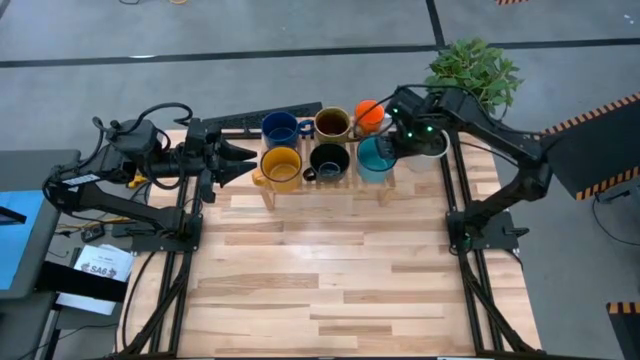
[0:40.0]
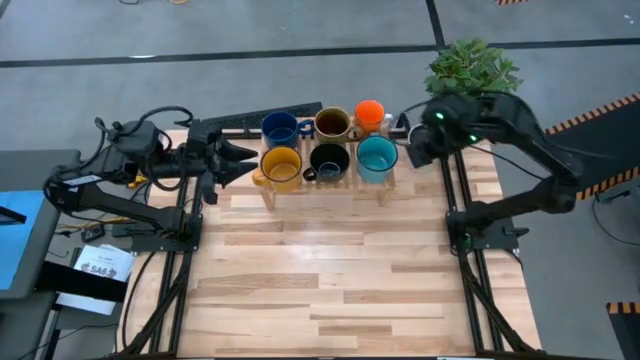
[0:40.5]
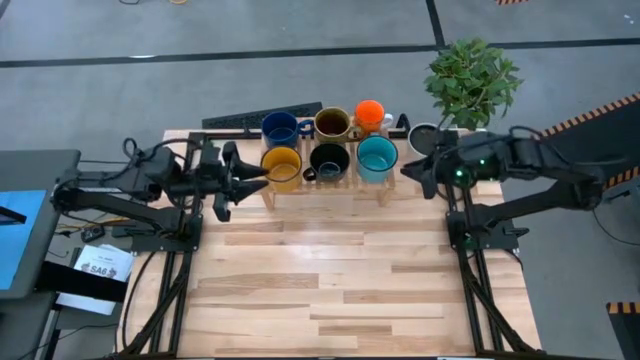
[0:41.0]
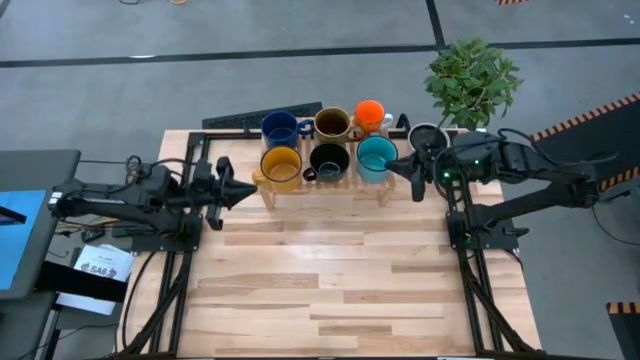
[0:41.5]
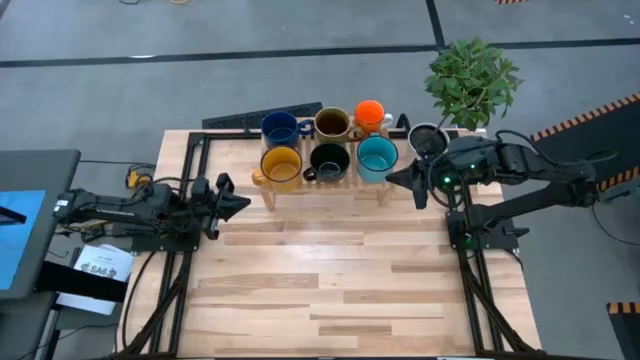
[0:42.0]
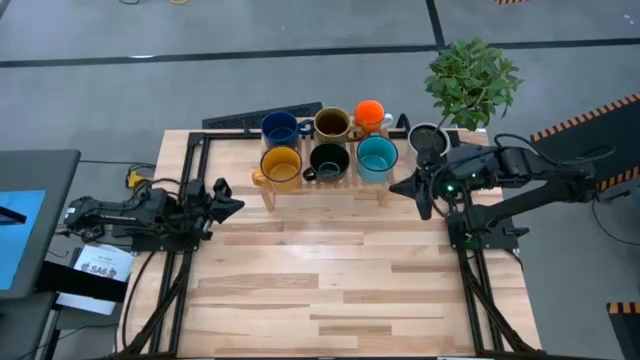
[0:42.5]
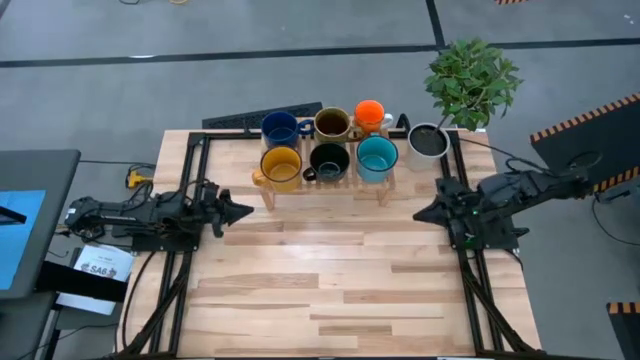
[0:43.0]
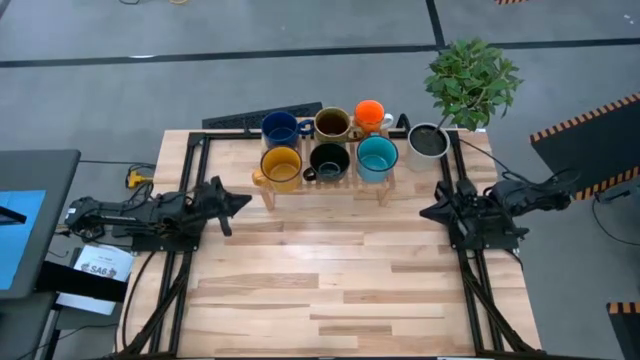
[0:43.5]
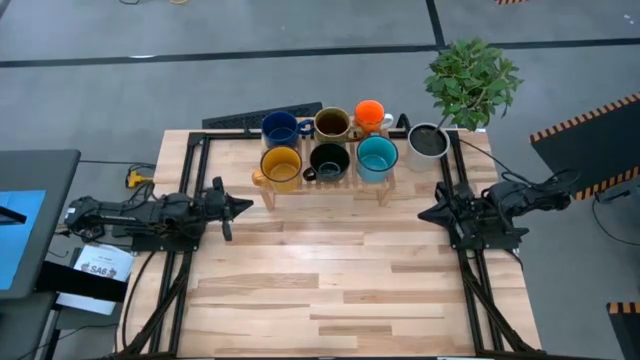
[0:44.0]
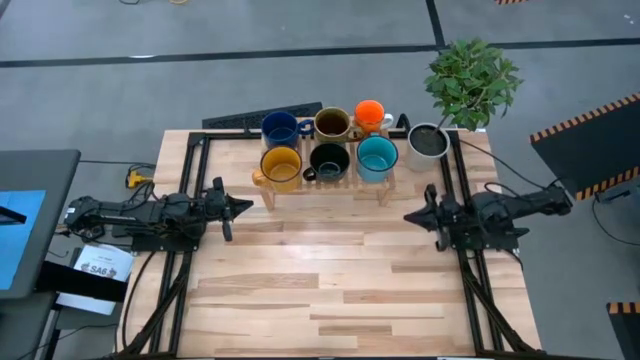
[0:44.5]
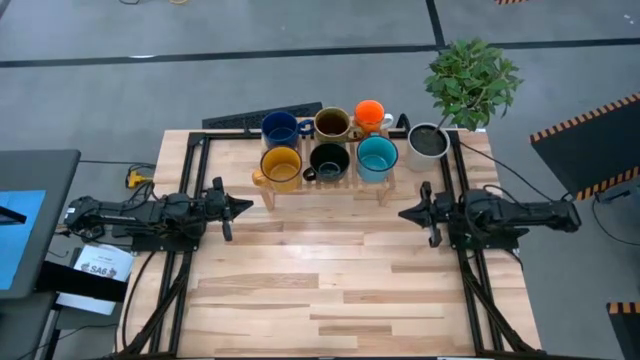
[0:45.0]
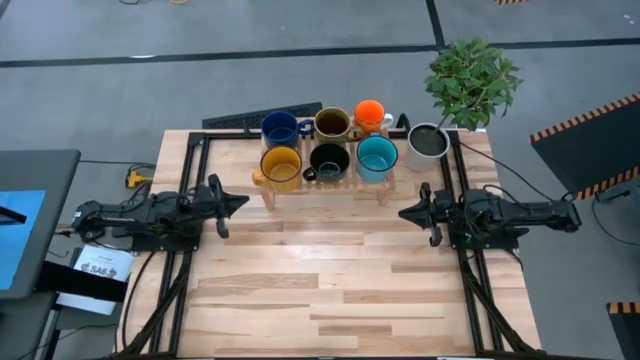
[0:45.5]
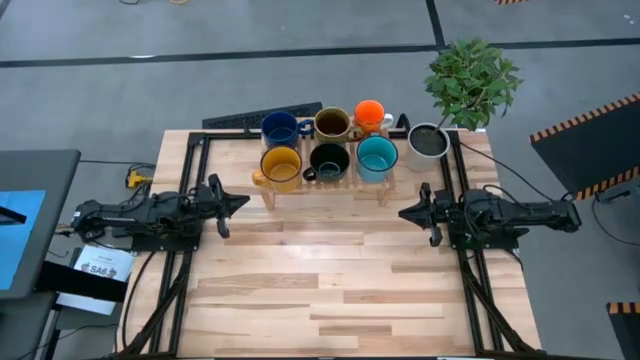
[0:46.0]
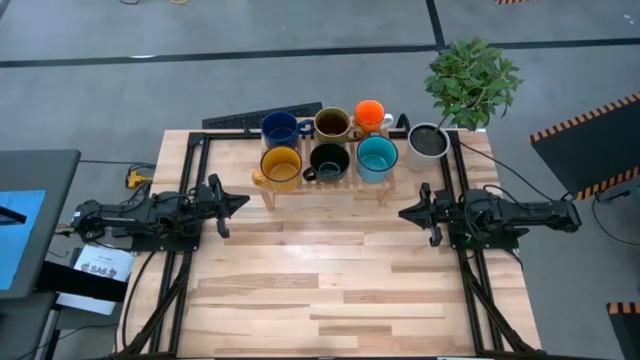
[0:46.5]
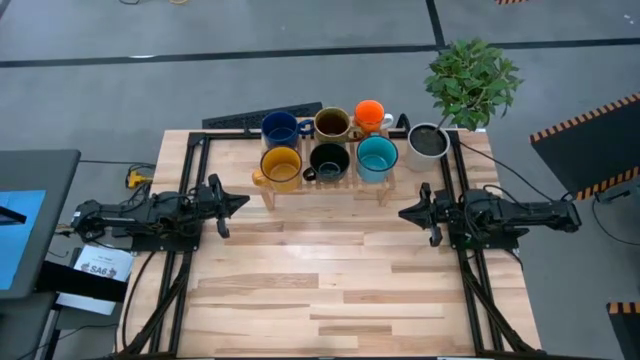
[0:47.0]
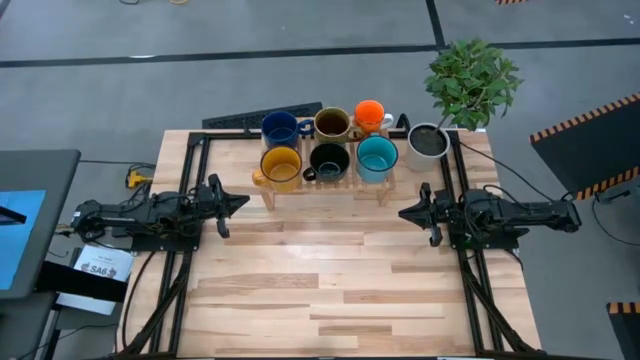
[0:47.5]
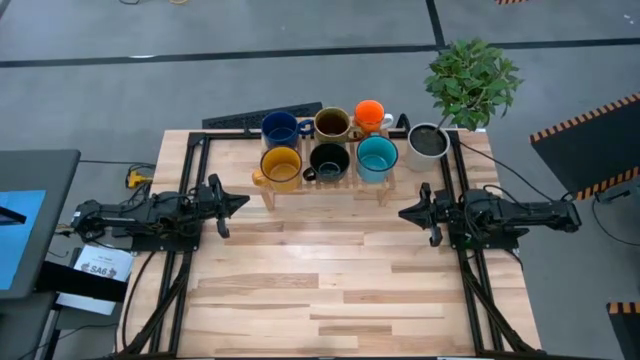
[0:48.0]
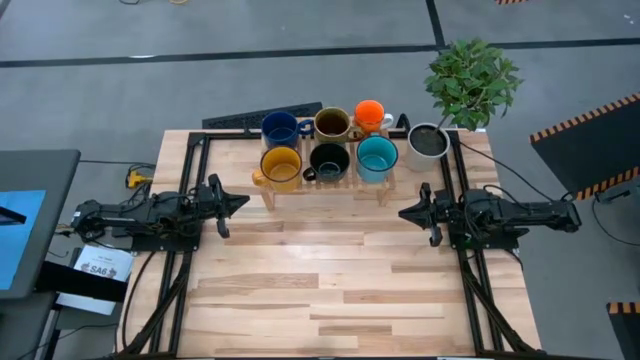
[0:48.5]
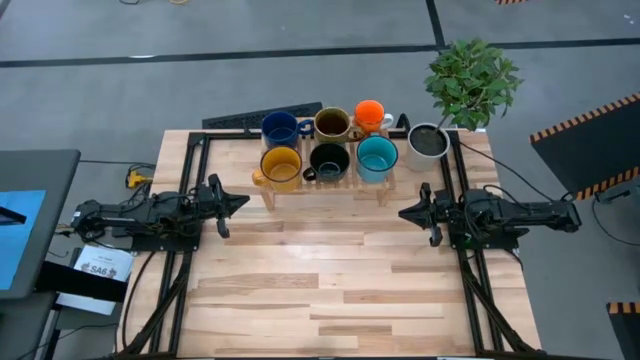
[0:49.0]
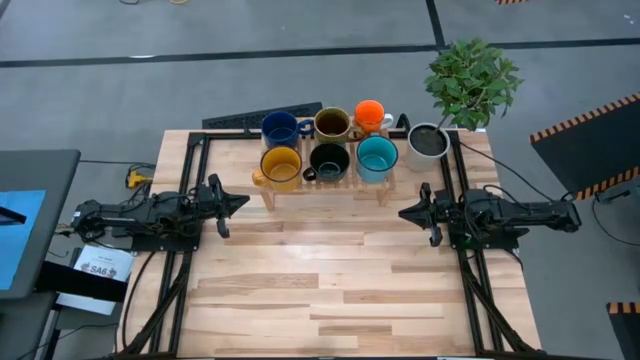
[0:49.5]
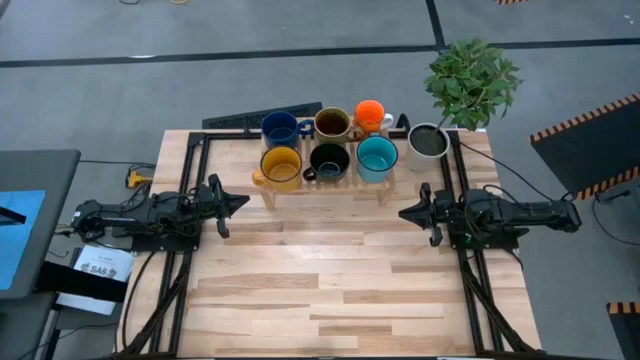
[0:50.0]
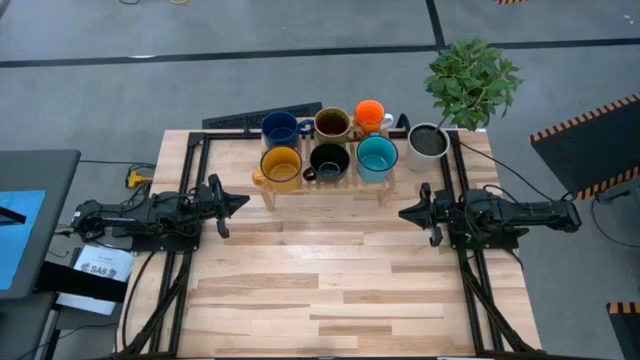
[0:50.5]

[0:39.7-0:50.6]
Task: Place coffee mugs
Return to Home Position

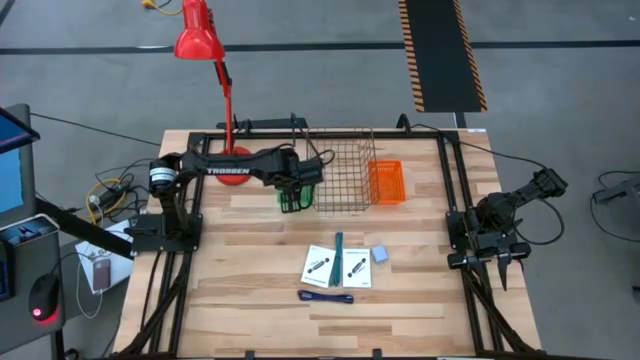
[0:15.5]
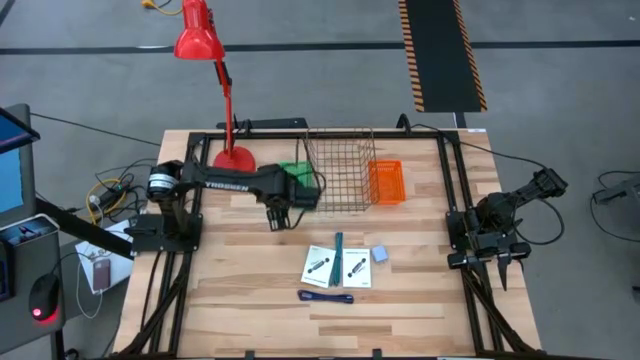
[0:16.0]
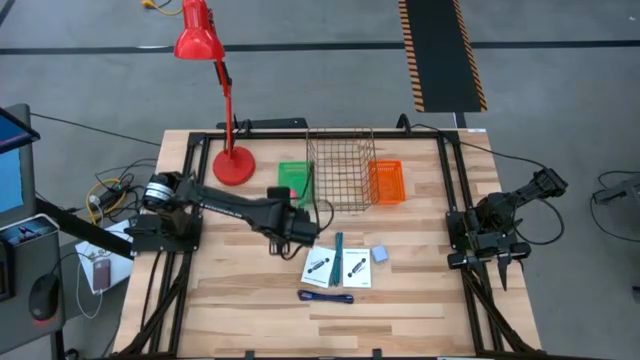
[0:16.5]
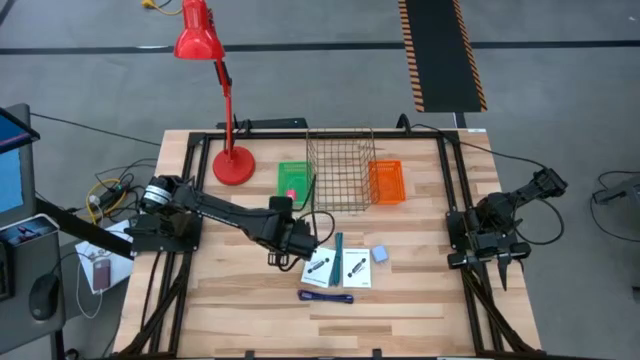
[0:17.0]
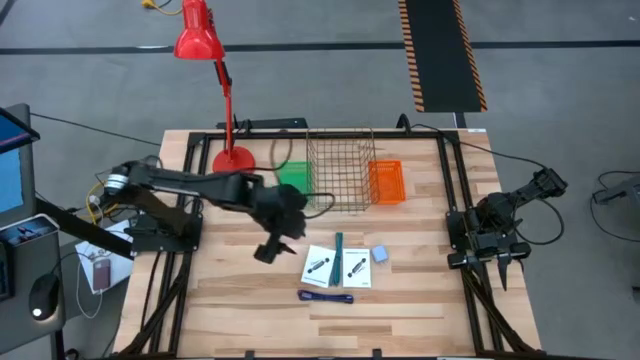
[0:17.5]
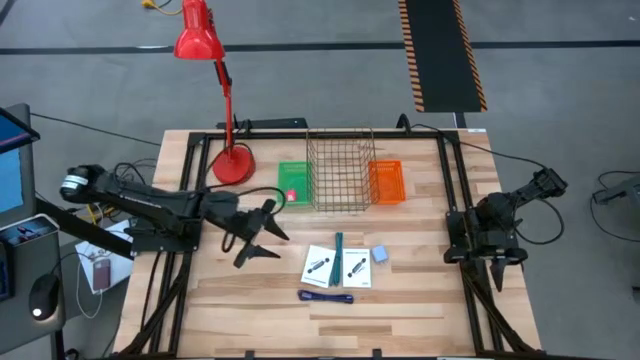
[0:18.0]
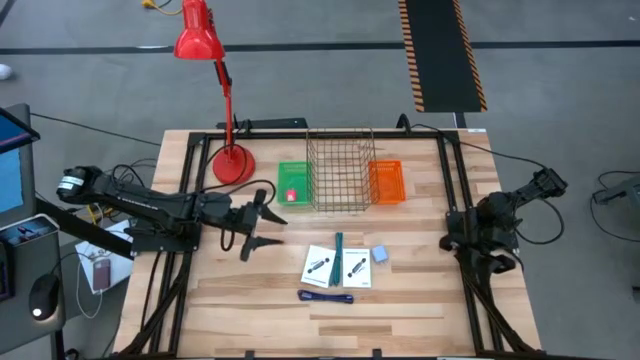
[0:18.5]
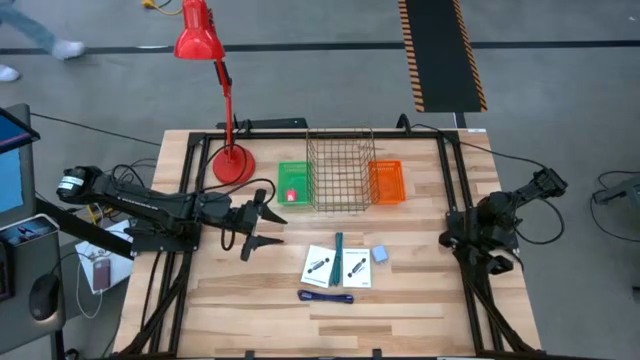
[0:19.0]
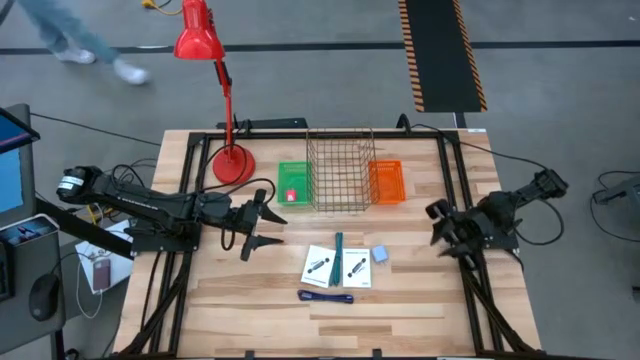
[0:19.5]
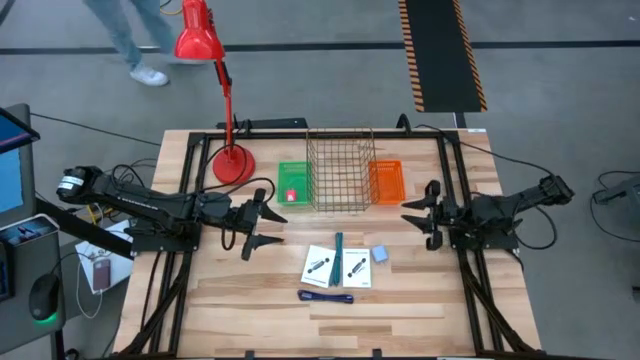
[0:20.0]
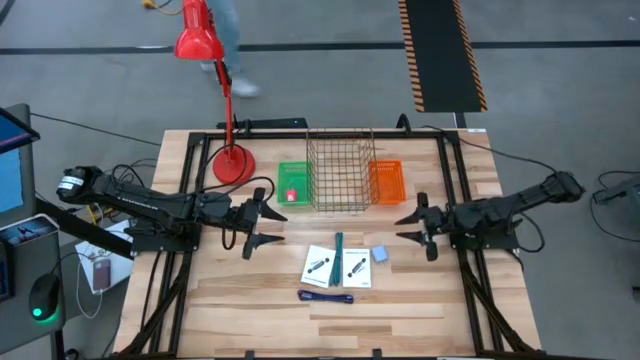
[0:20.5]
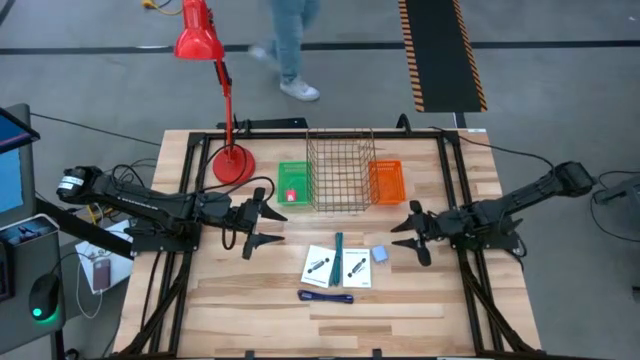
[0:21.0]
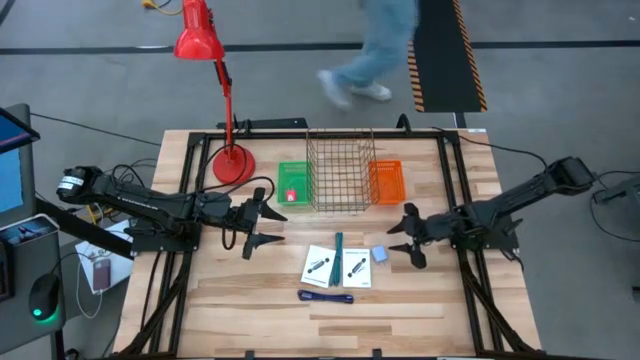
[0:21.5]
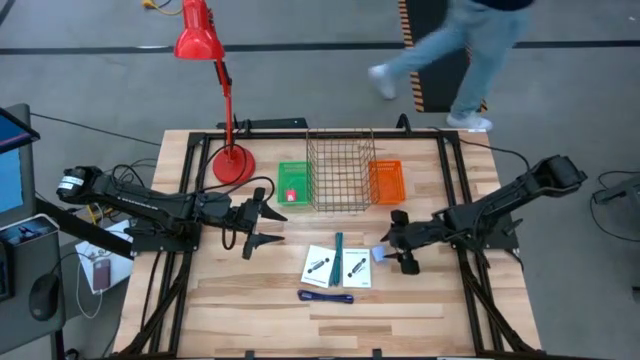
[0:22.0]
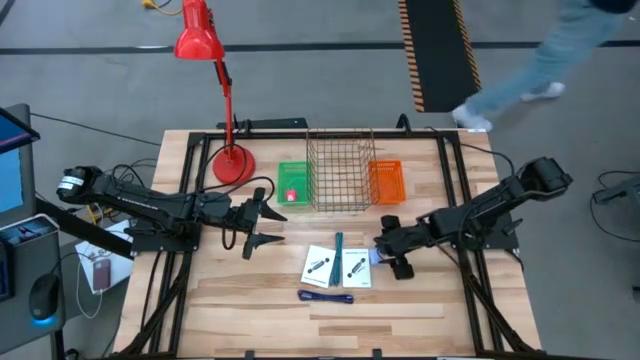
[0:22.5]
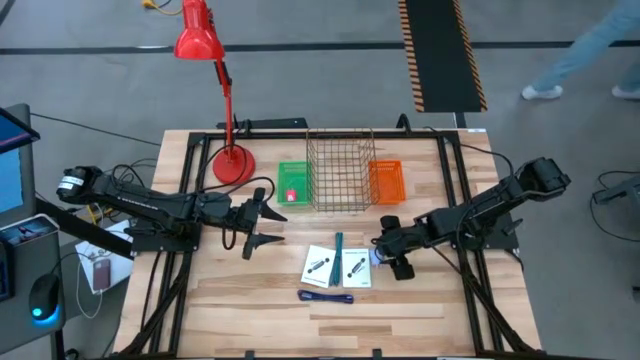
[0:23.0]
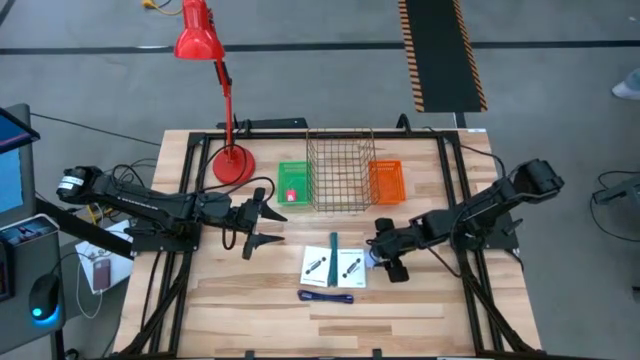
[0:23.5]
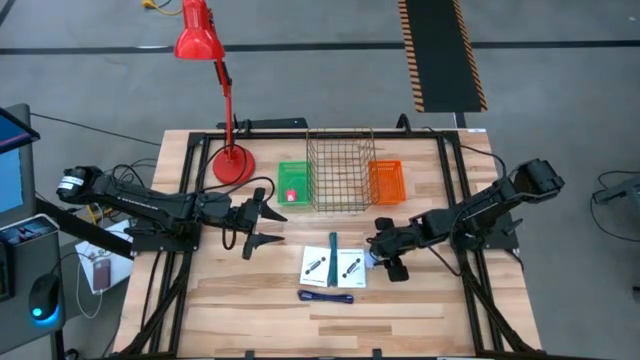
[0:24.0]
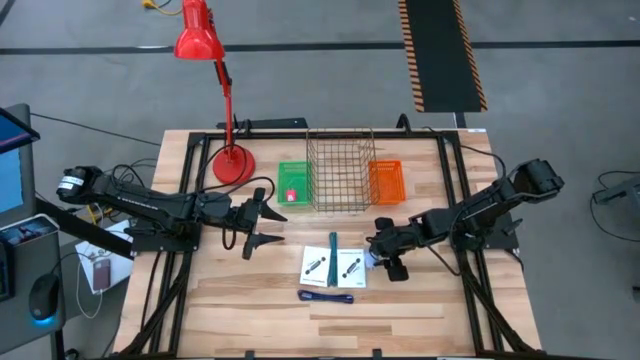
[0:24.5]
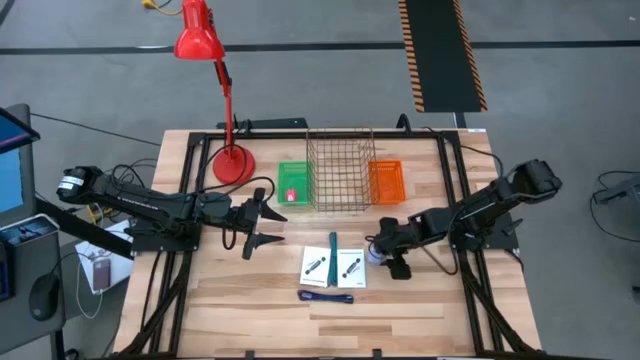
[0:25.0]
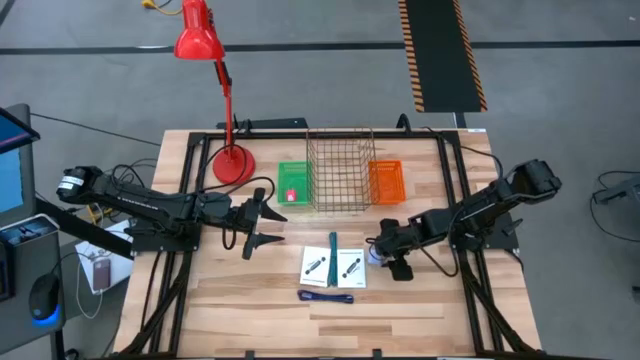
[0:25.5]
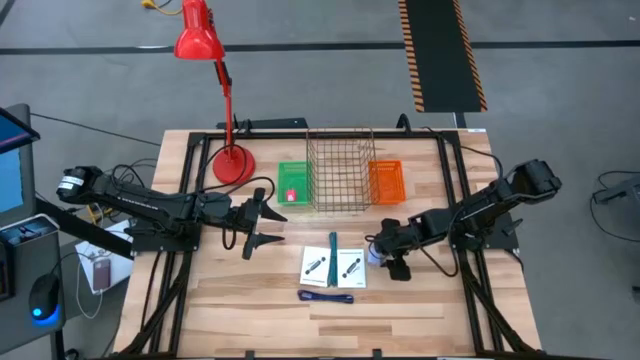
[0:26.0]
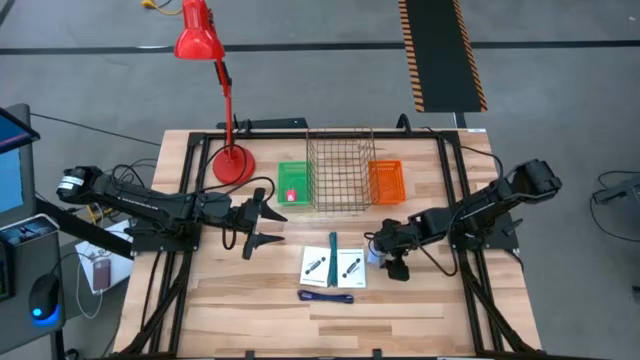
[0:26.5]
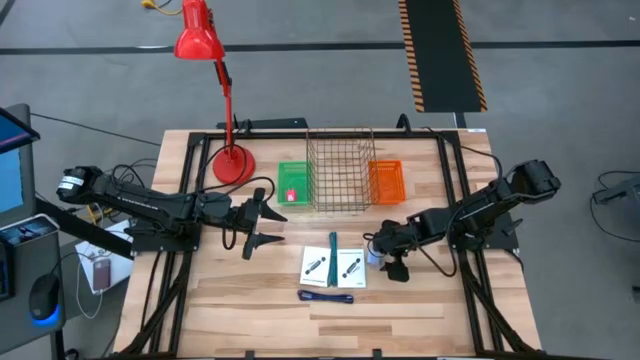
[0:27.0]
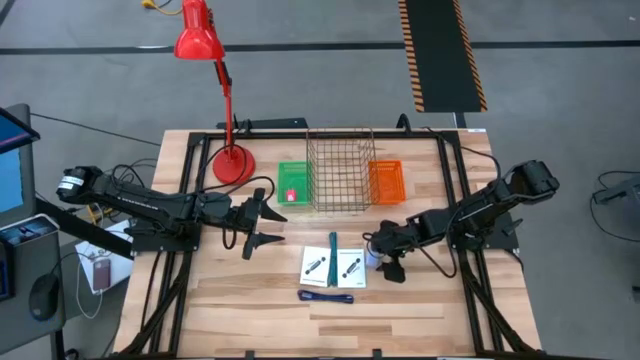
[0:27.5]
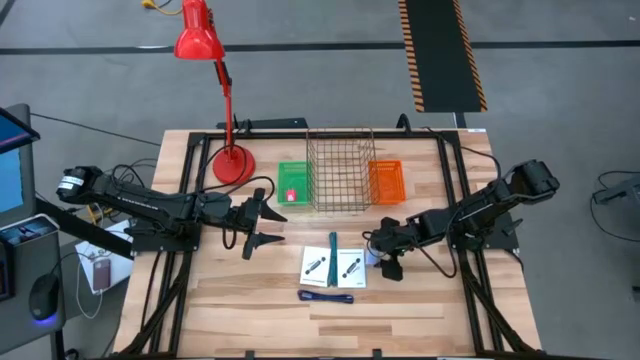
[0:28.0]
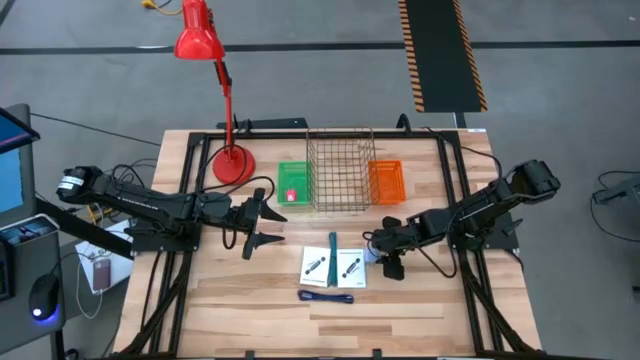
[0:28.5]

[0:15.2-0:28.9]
Task: Pick and place items into bin
Put the light violet charger adapter into the green bin
